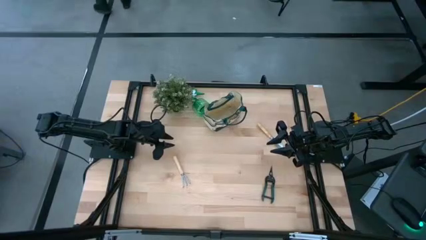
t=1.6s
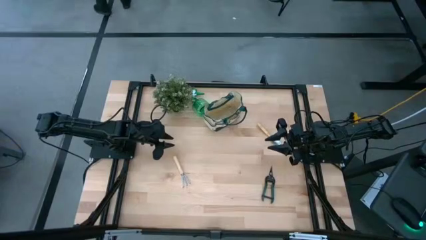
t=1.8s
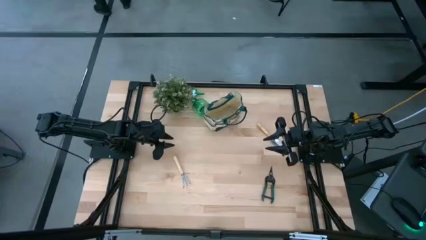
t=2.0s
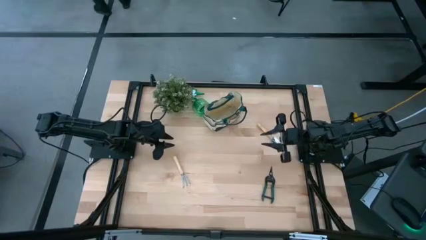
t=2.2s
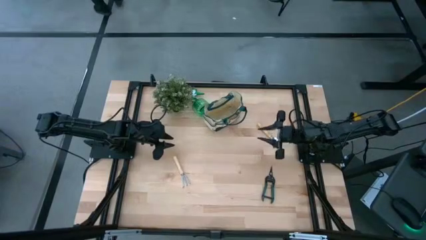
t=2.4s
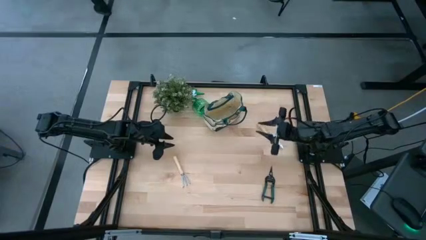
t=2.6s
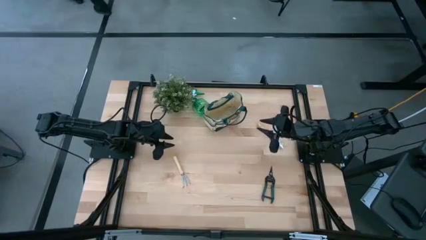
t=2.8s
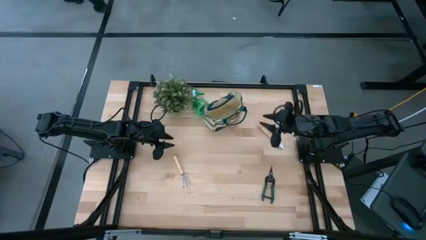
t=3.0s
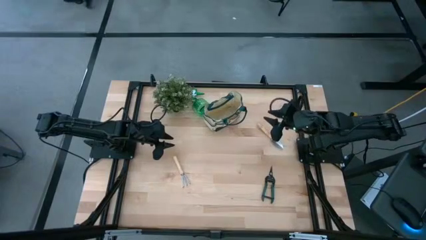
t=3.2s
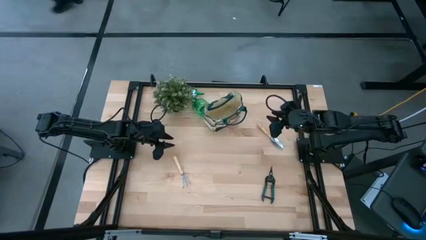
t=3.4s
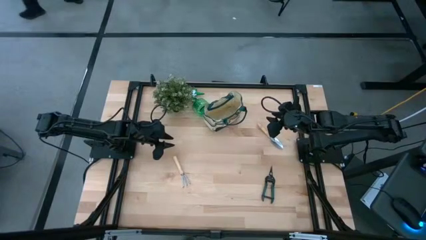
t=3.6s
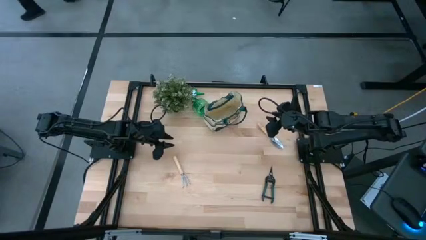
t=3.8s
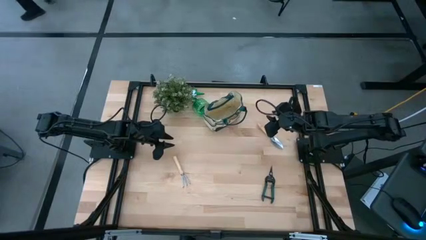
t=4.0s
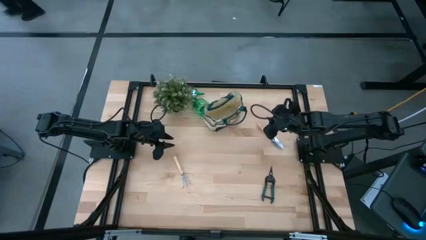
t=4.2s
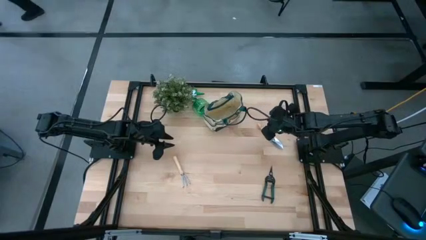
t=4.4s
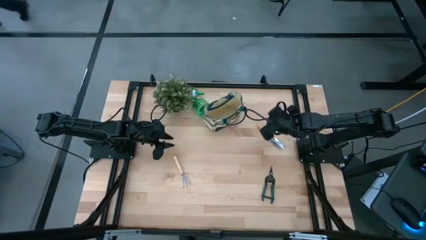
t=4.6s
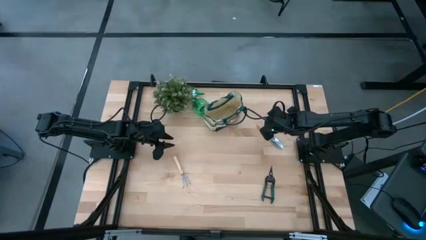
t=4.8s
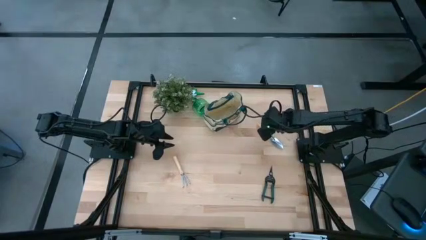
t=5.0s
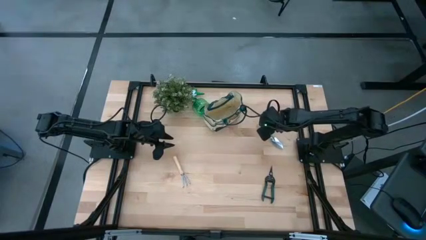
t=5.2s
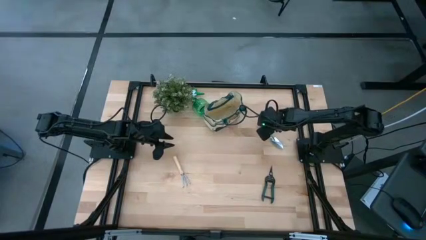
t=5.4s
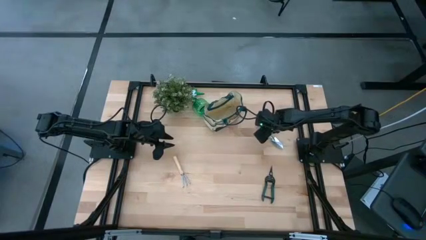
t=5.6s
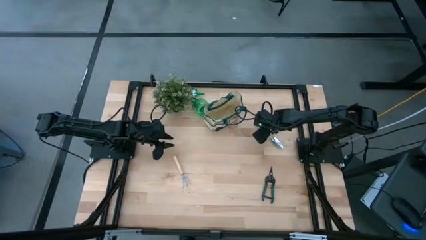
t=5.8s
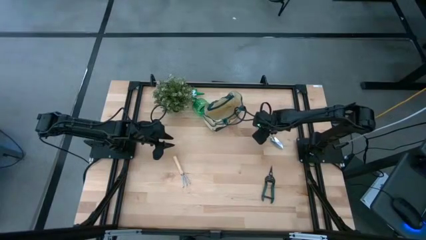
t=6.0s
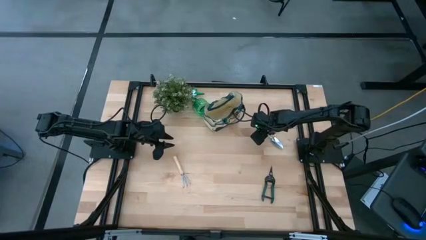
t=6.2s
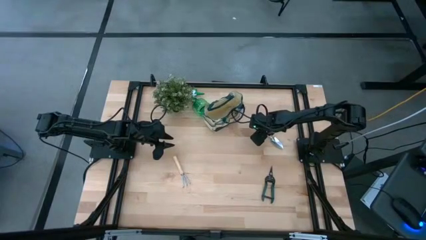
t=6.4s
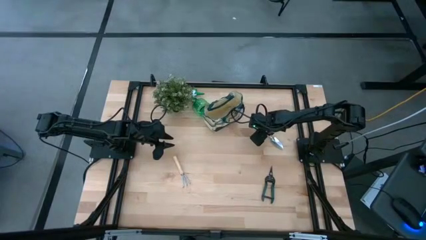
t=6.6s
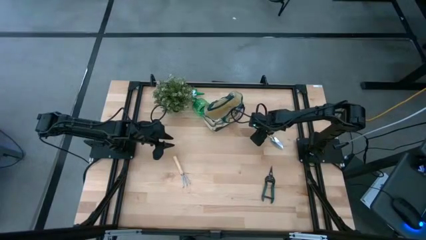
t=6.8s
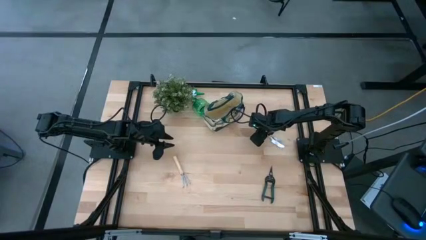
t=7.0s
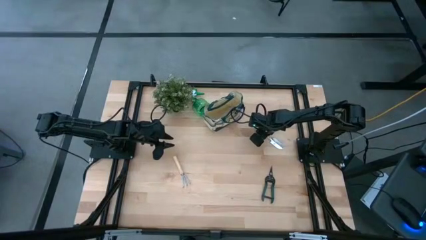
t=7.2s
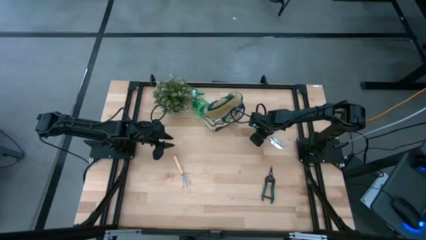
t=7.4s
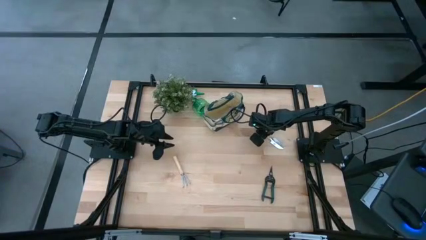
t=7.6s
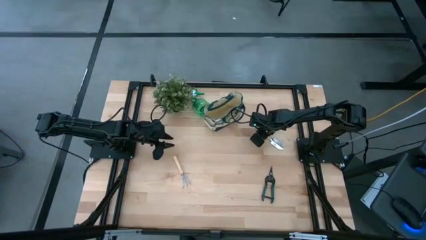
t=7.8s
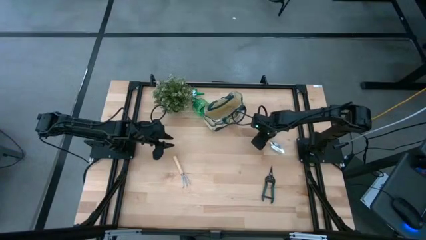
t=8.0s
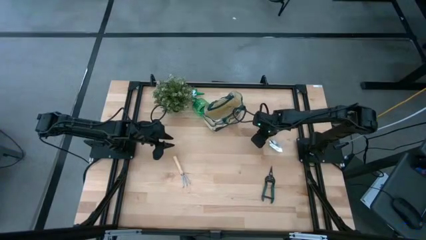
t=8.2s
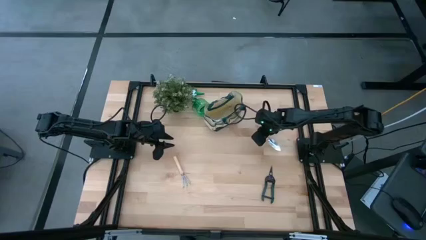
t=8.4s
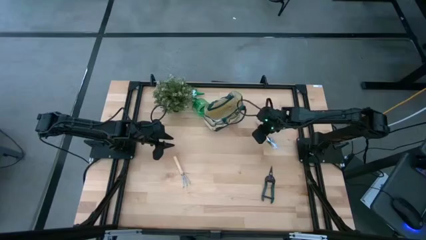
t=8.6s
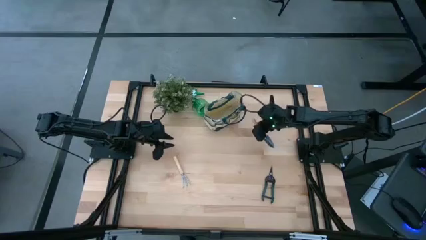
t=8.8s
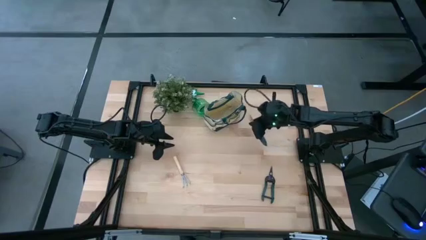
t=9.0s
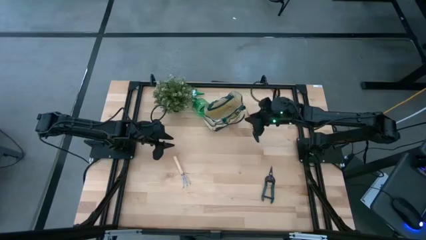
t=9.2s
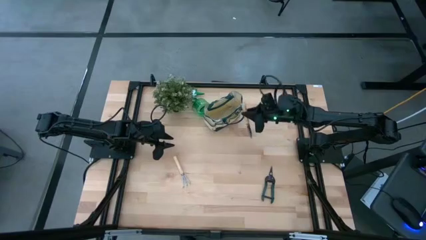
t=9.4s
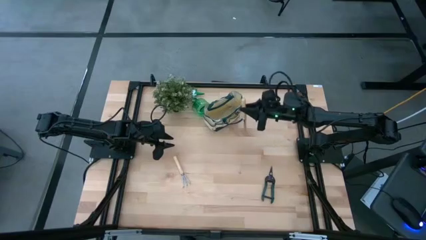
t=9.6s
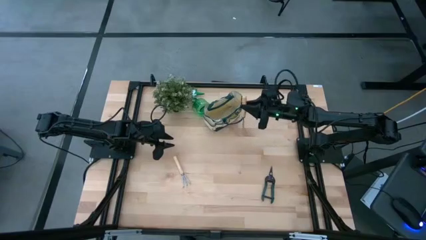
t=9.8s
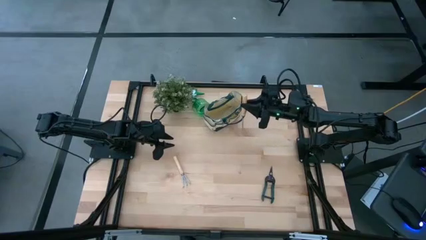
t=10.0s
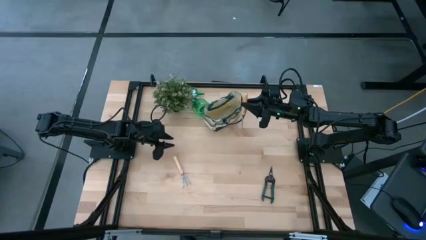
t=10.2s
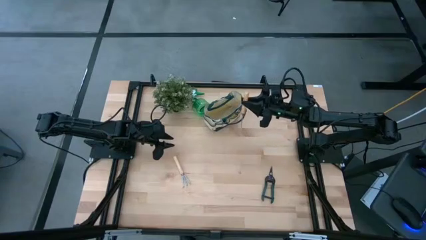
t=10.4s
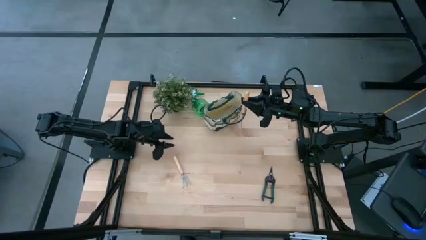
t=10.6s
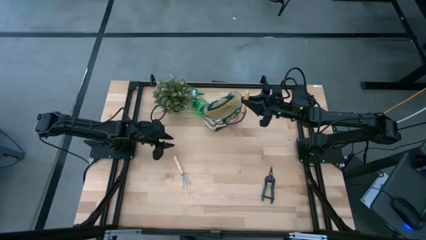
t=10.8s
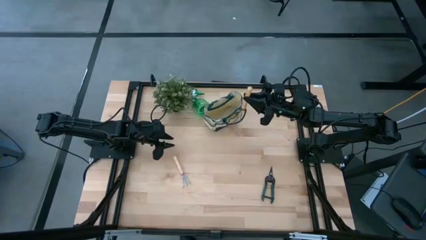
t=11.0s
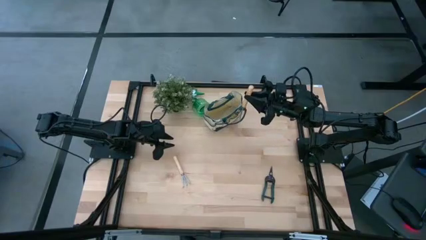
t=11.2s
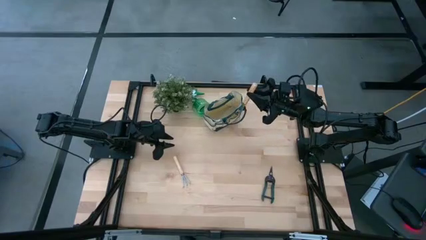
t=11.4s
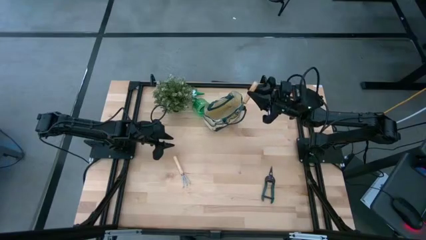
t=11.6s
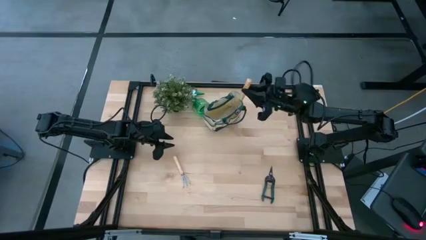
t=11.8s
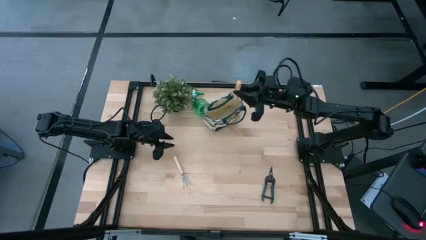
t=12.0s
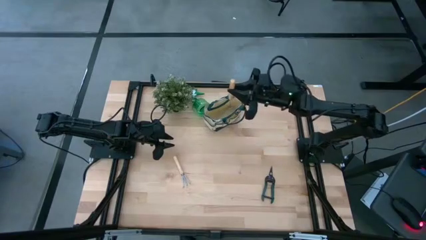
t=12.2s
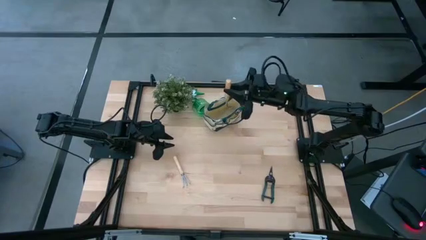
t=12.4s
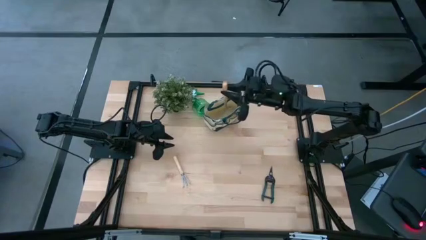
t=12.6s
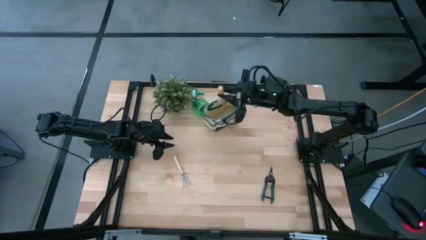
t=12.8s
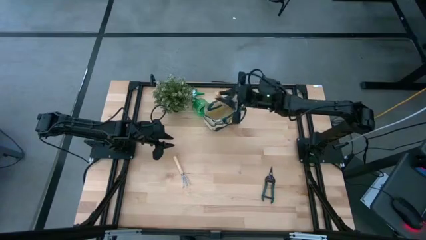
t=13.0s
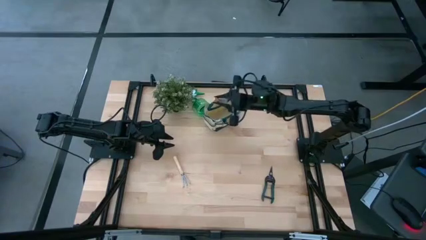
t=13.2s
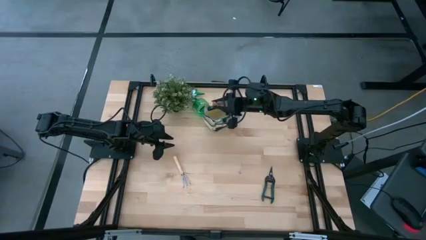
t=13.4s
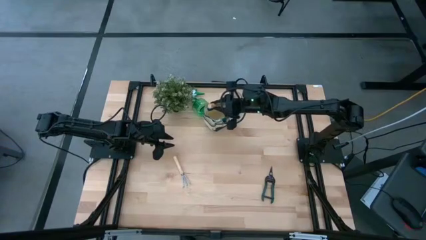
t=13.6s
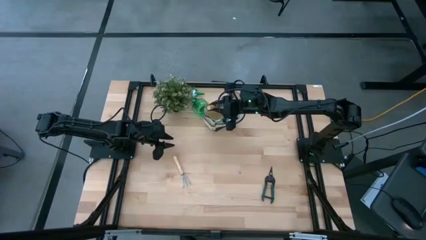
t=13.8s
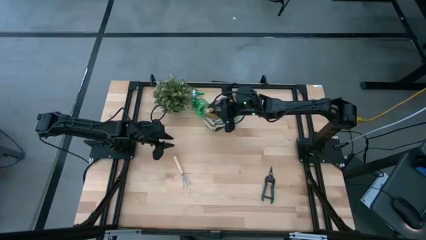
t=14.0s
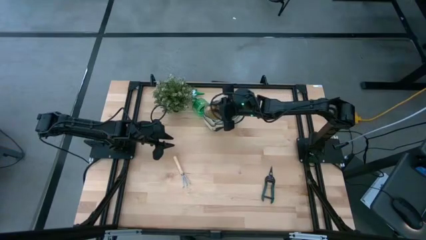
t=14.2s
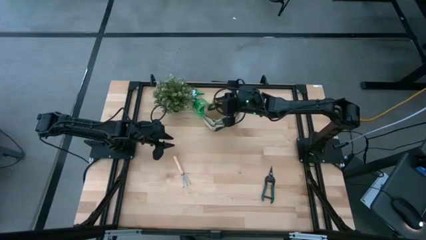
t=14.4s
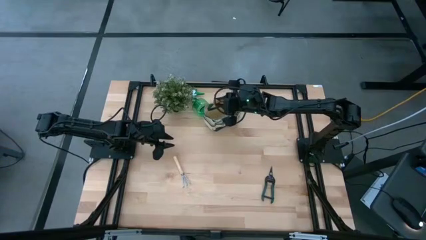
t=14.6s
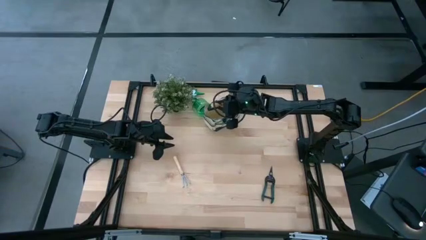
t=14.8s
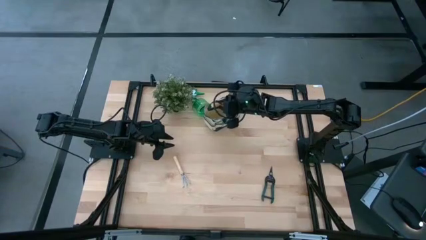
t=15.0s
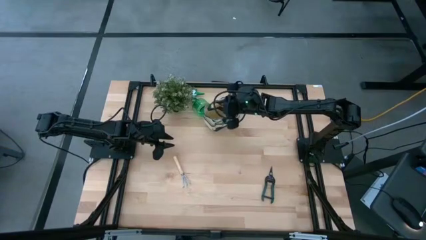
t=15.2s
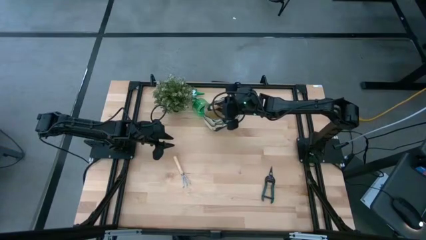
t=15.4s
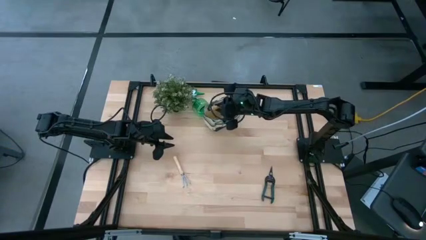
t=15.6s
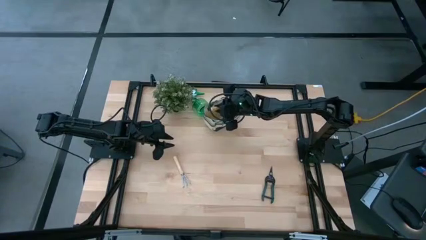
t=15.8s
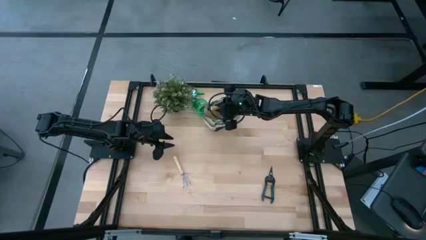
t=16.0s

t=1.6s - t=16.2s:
Task: Pick & Place Garden tools in Gardening bag
Put the trowel into the gardening bag

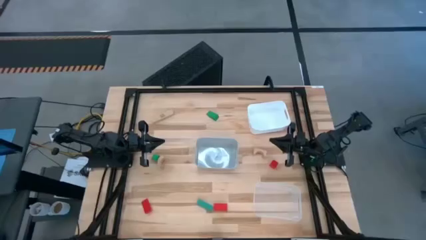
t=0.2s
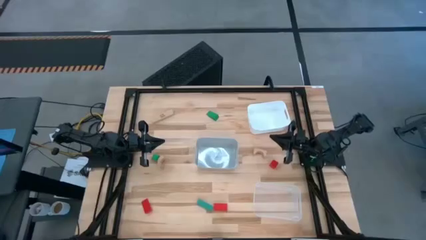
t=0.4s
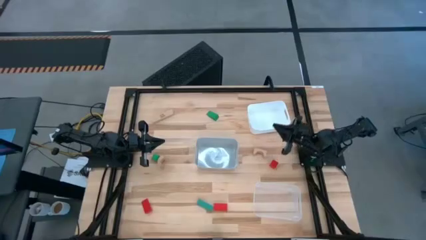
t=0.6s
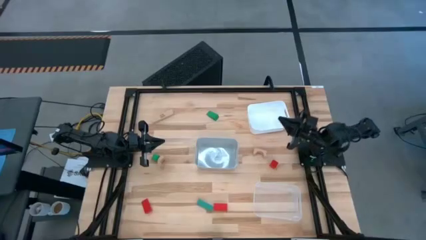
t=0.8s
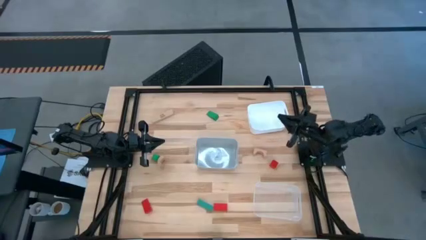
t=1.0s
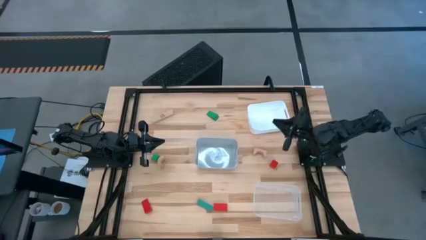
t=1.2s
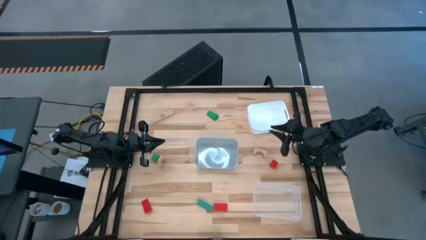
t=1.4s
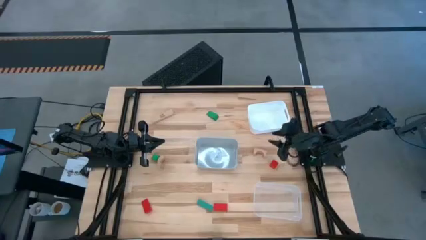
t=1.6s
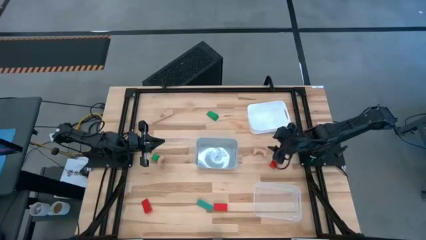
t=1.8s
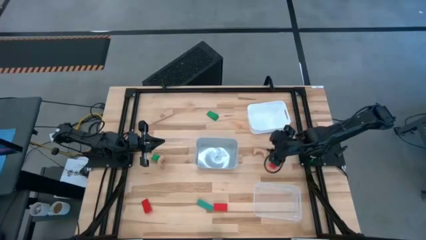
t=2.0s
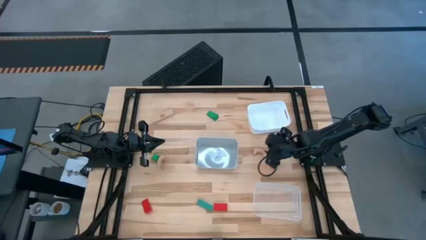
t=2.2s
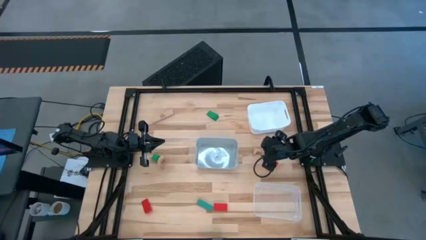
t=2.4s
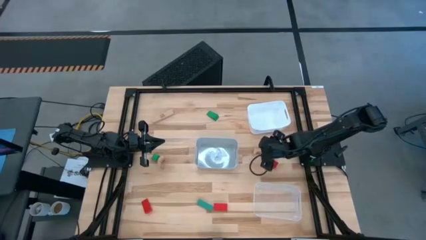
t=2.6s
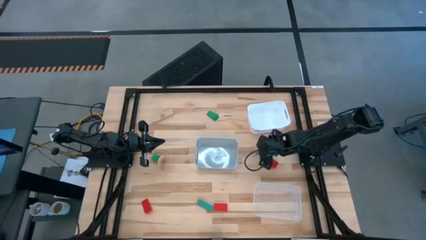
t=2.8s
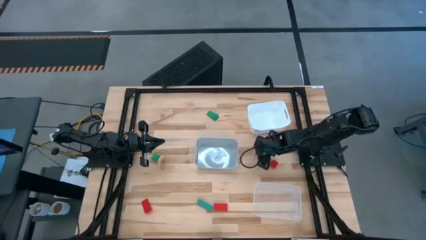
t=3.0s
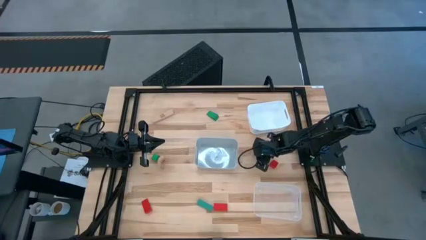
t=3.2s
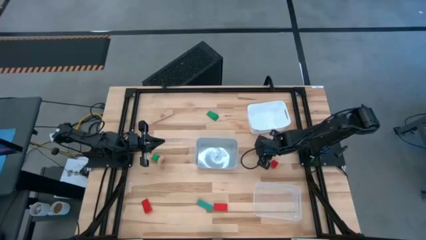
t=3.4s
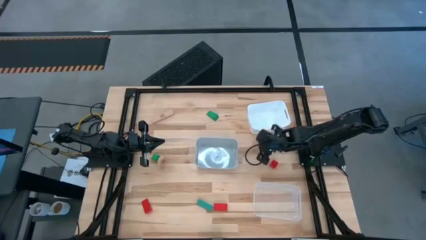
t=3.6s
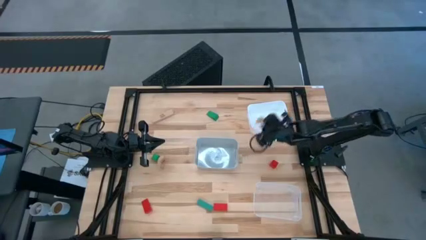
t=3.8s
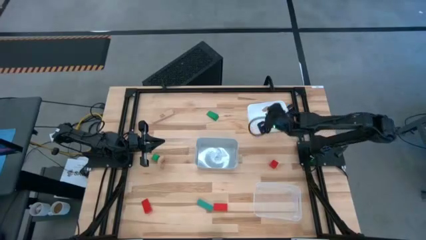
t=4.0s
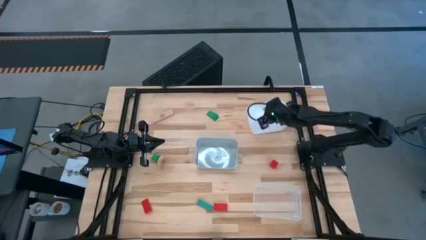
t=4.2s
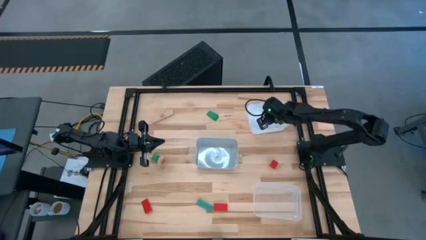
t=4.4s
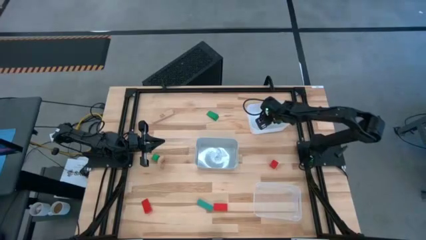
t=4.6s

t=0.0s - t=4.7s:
Task: Sort & place blocks by color
Put the bottom right brown block into the white bin
